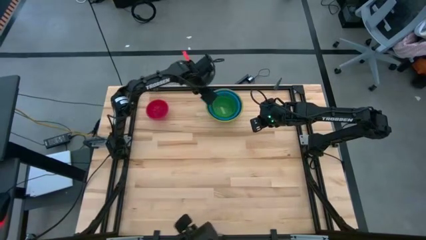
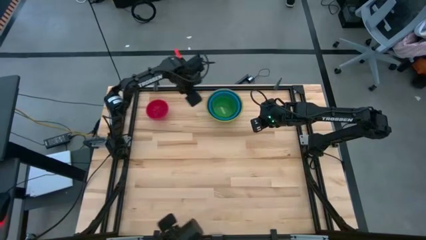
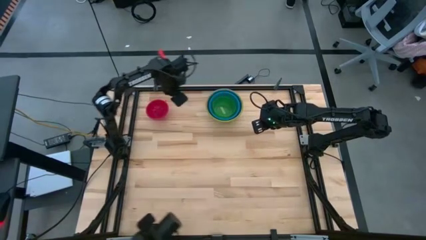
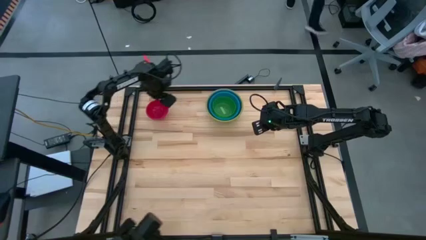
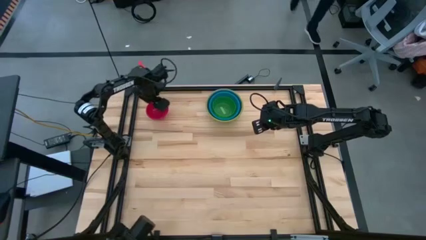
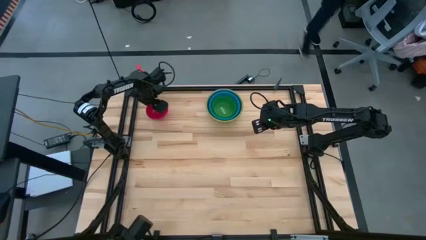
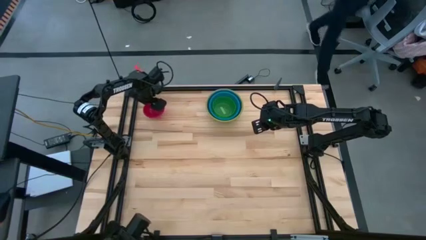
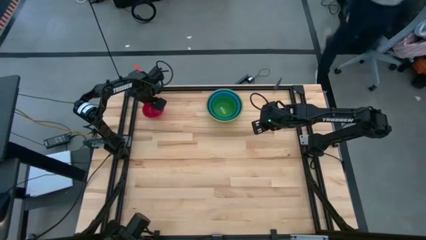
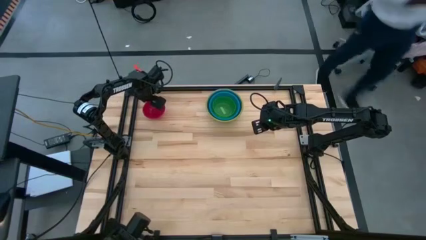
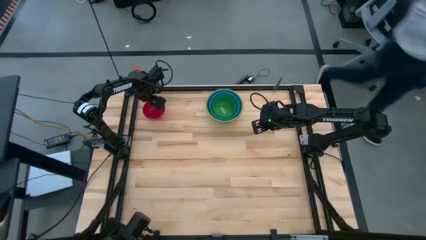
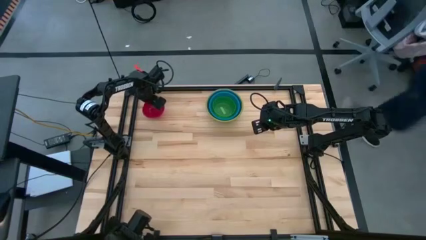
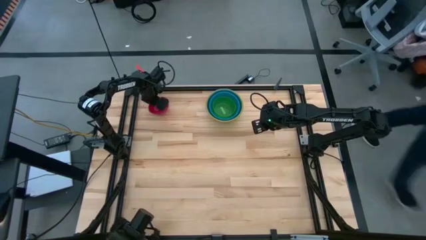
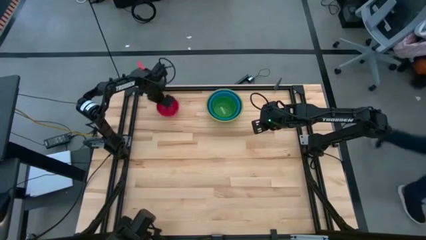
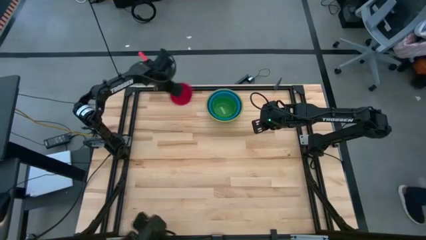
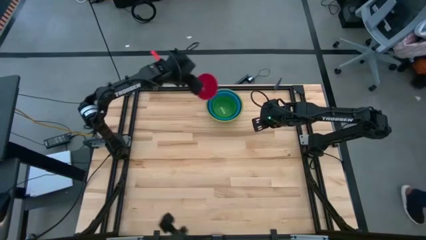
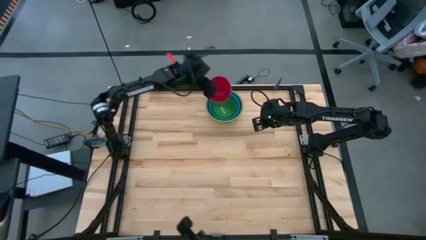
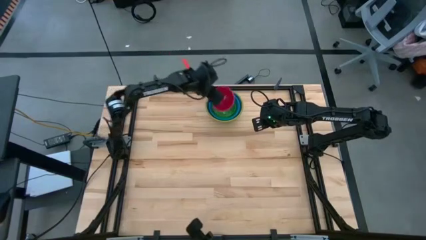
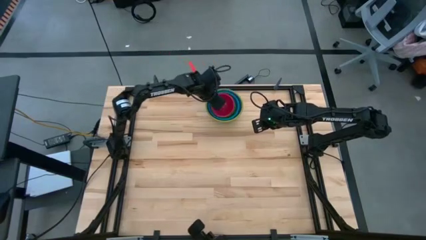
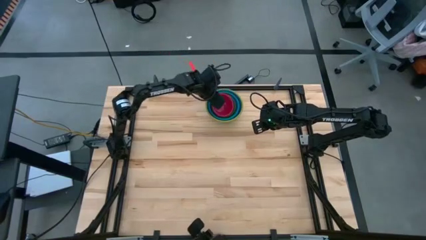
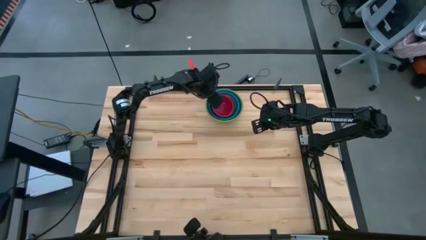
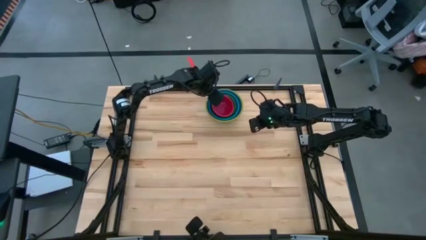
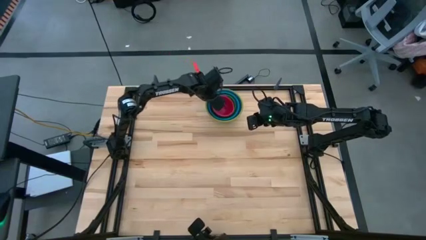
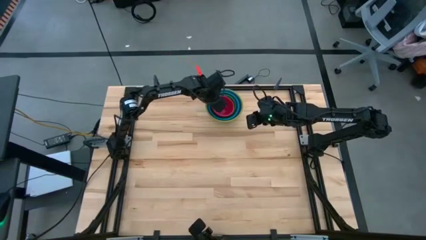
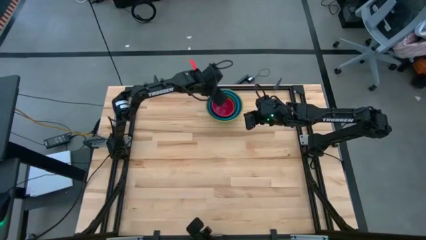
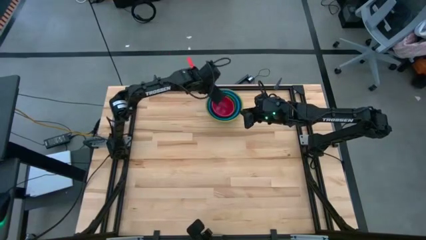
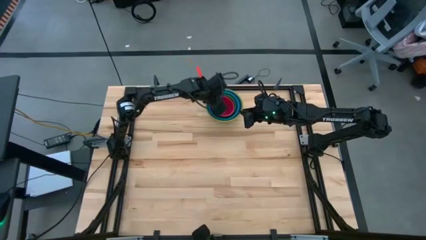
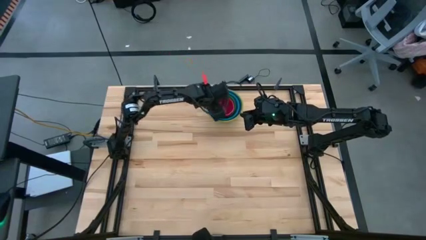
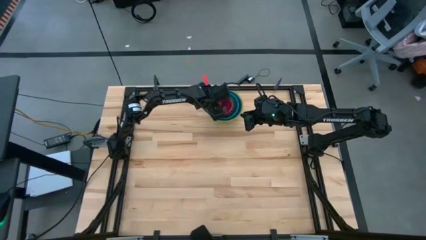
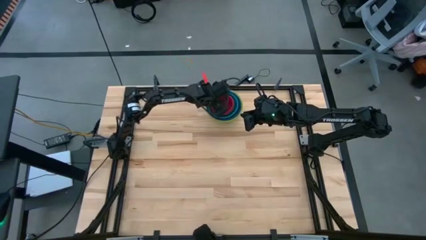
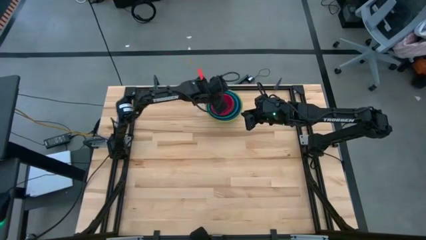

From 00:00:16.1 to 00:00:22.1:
Stack the red bowl on top of the transparent green bowl on the table

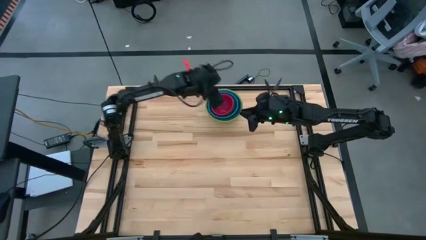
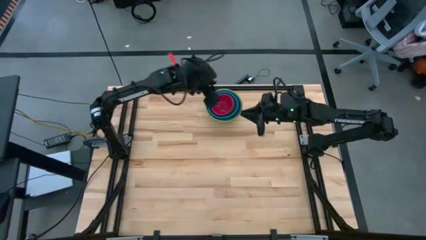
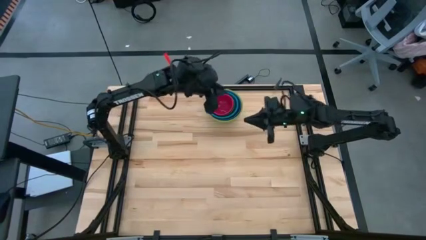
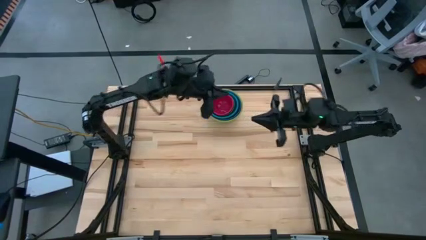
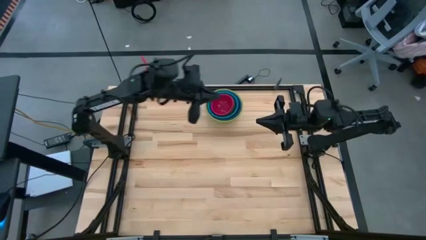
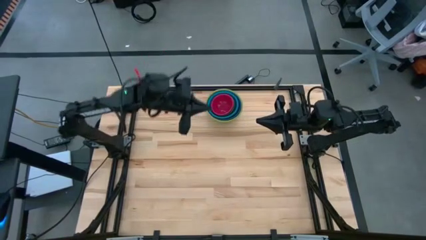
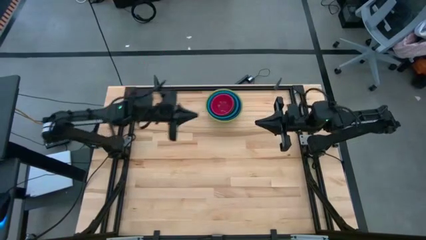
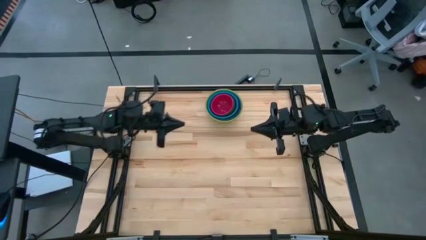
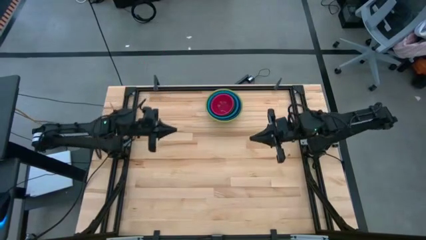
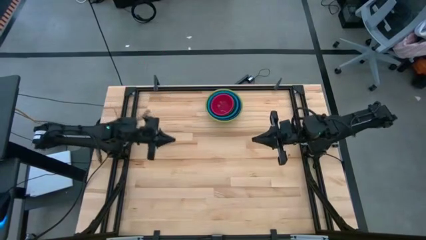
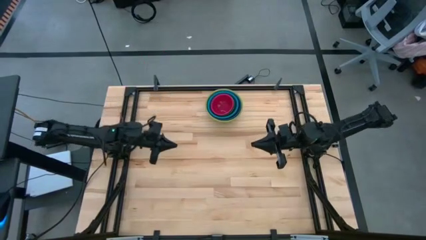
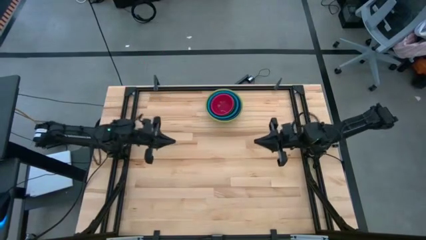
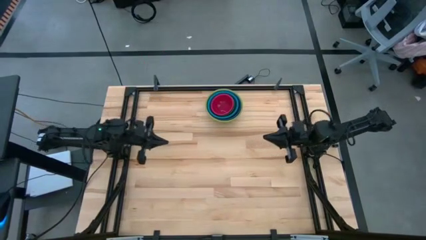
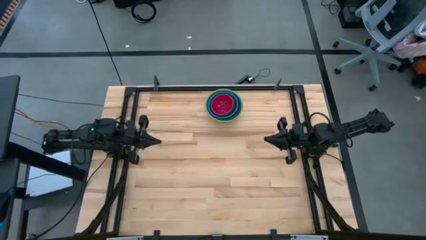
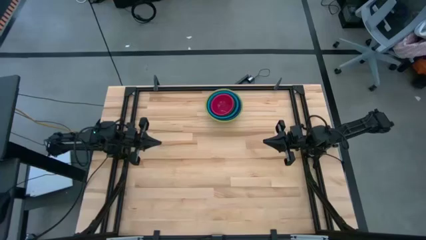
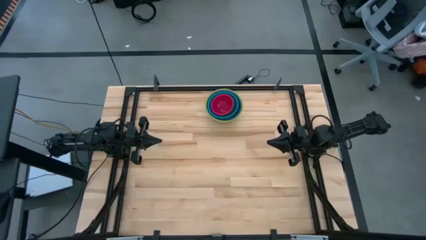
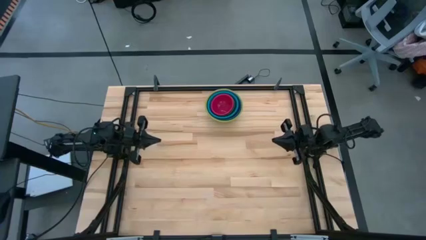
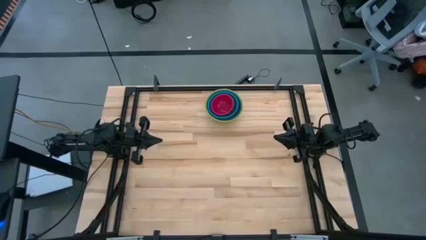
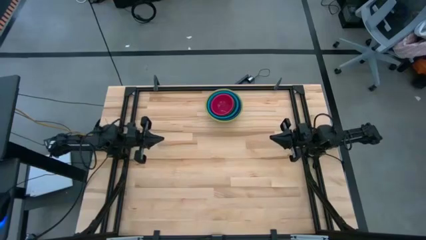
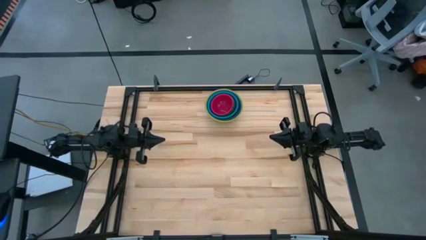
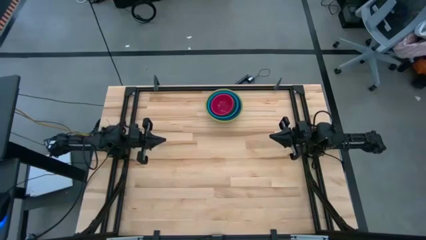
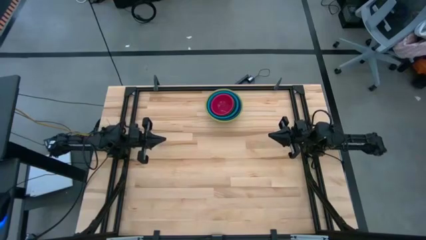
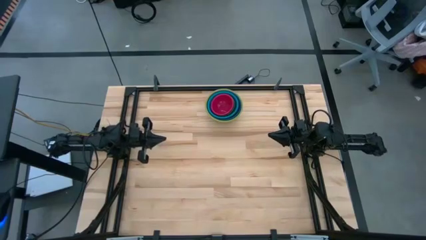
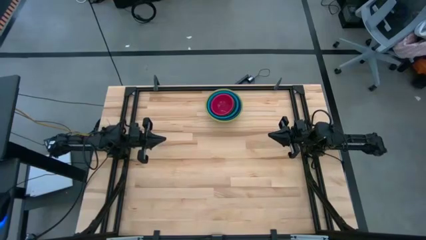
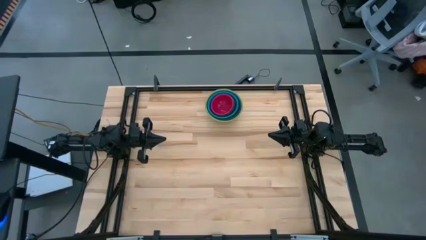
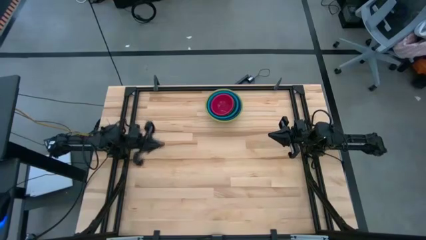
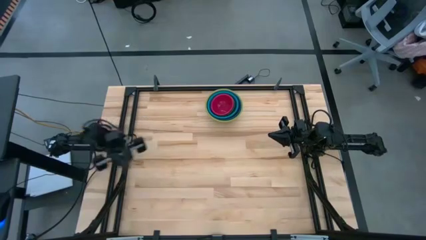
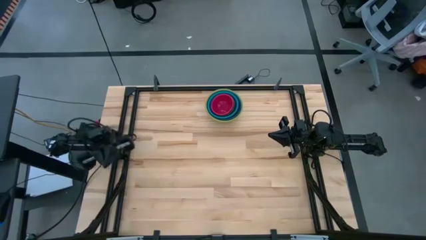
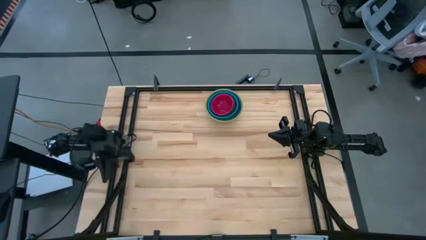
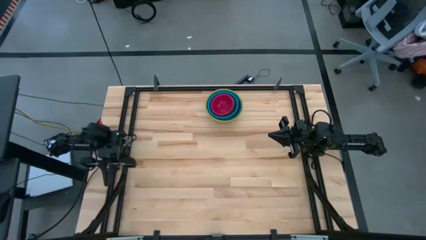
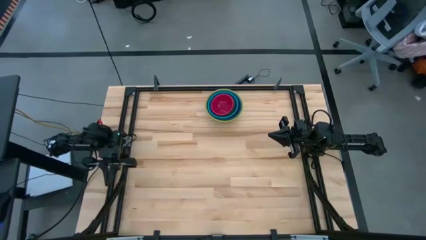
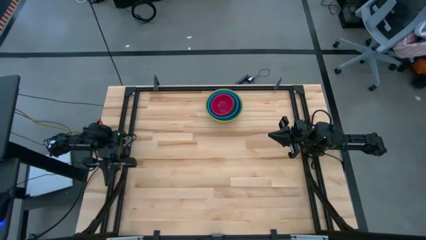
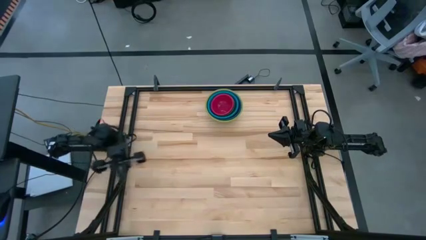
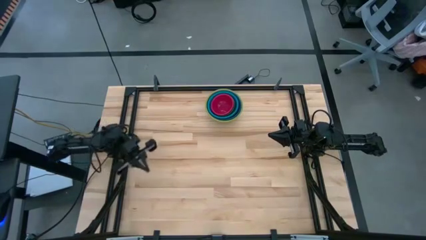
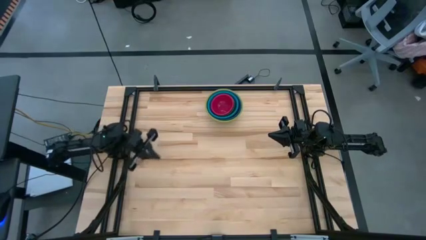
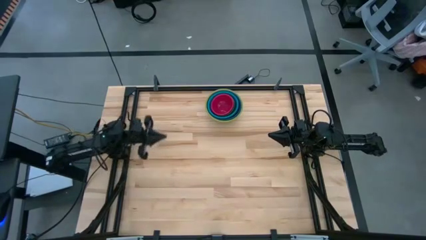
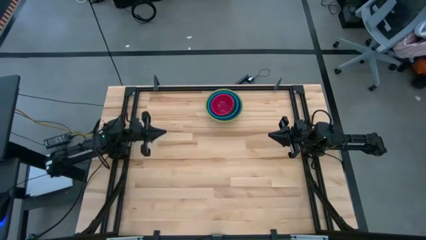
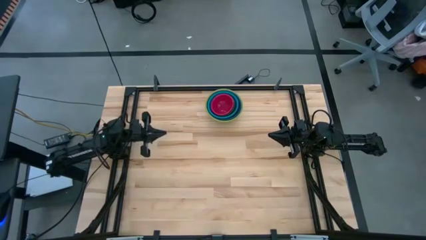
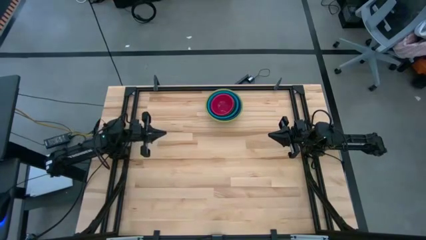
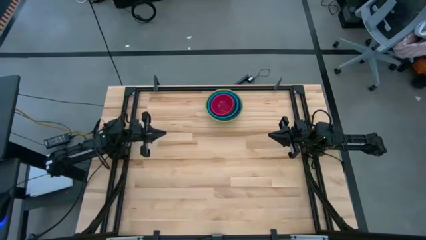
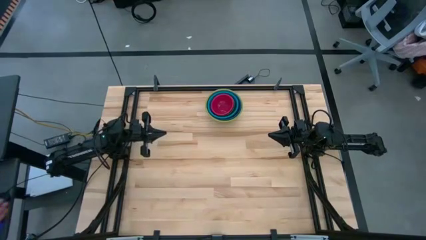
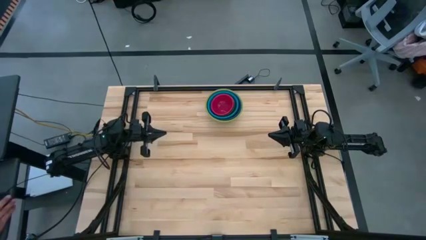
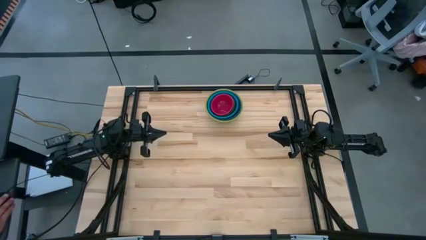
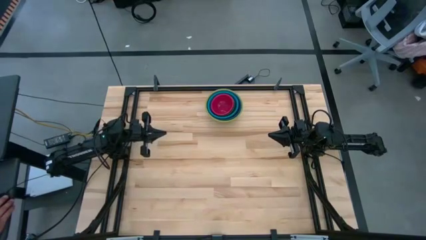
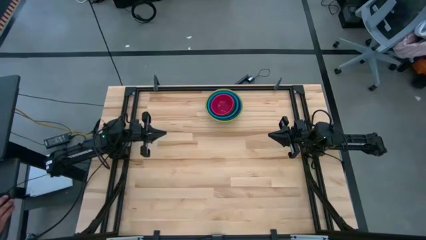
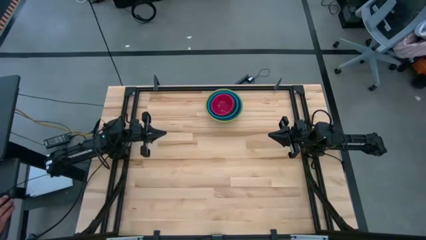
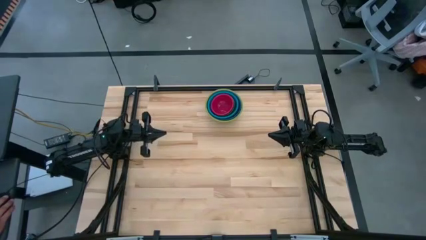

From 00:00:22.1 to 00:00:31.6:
Return to Home Position
